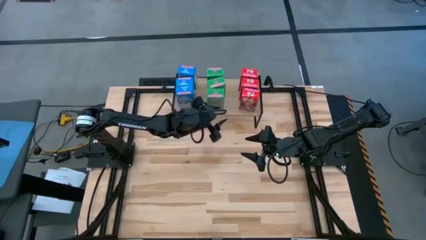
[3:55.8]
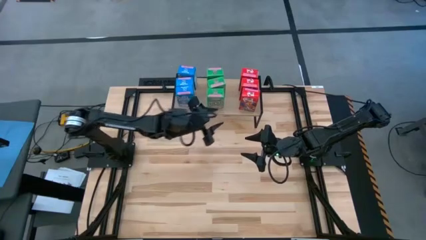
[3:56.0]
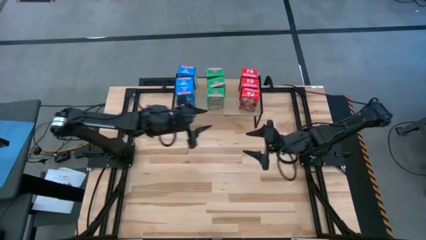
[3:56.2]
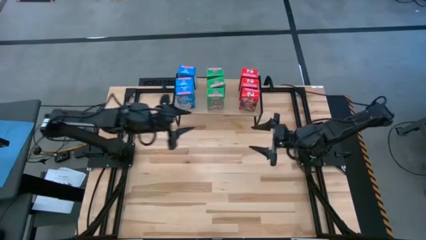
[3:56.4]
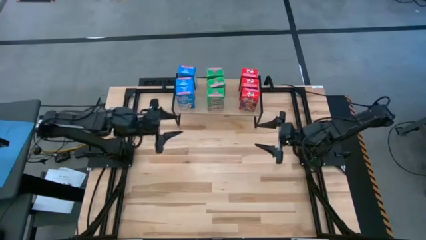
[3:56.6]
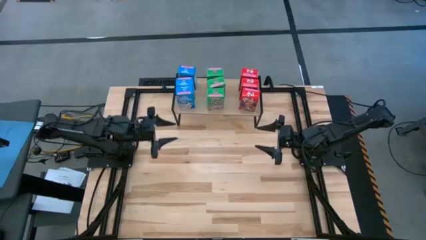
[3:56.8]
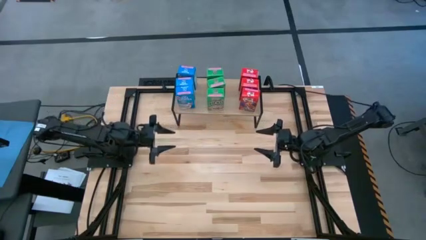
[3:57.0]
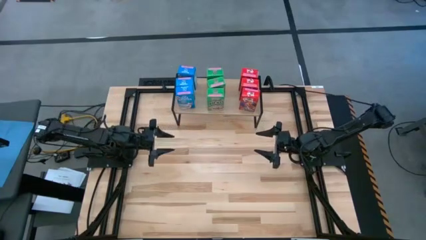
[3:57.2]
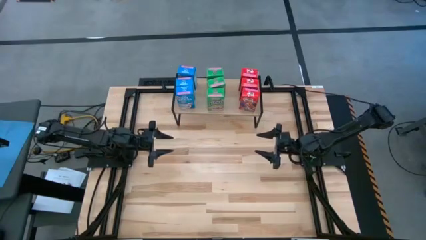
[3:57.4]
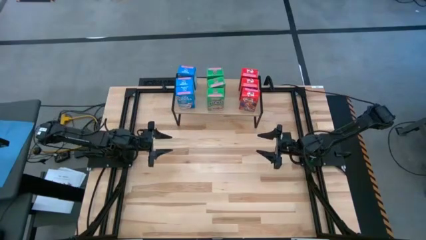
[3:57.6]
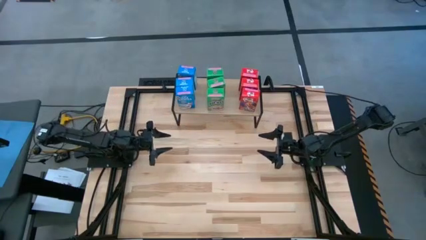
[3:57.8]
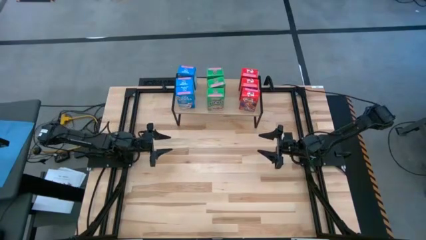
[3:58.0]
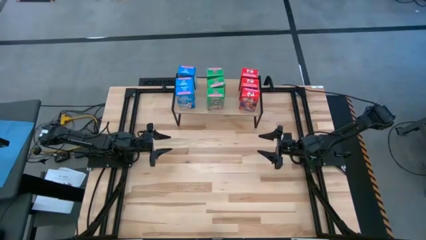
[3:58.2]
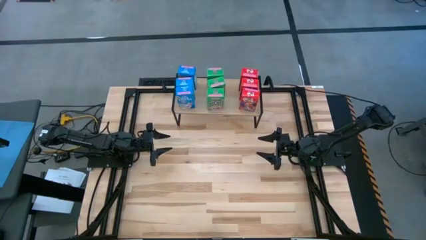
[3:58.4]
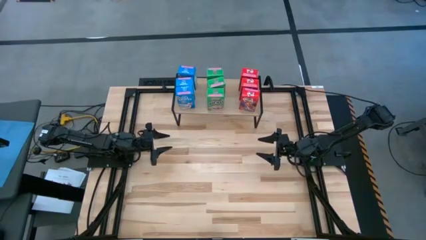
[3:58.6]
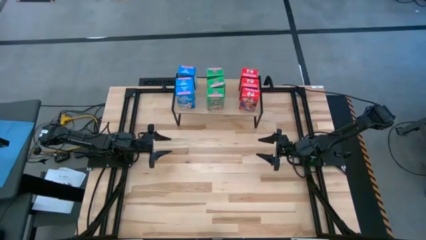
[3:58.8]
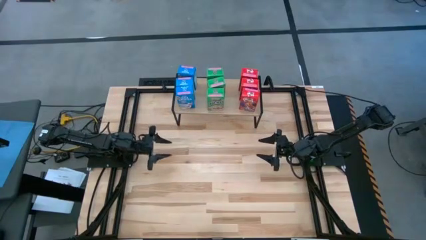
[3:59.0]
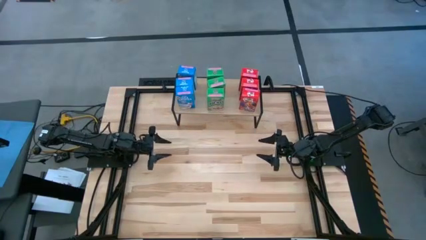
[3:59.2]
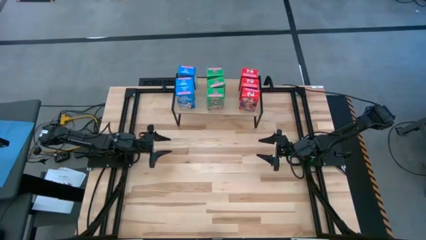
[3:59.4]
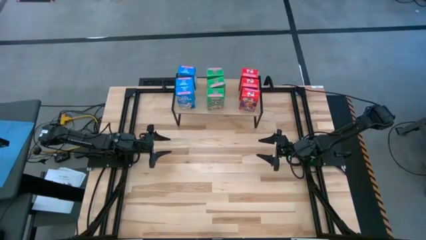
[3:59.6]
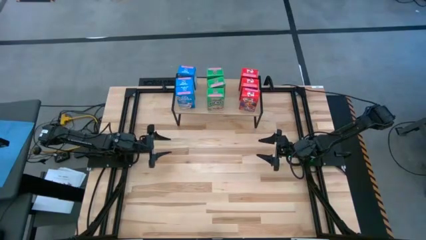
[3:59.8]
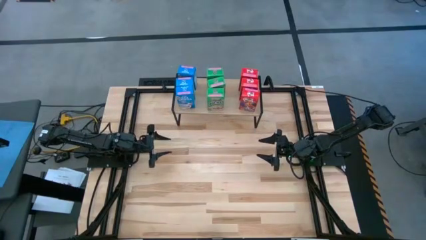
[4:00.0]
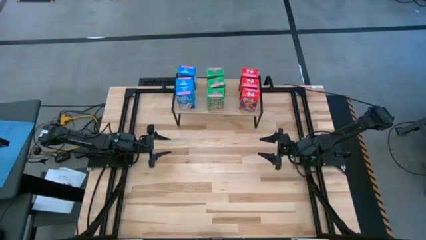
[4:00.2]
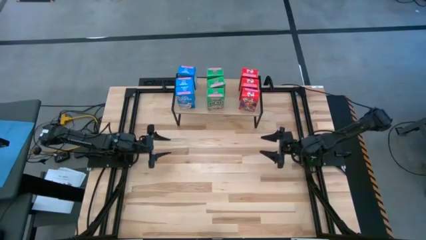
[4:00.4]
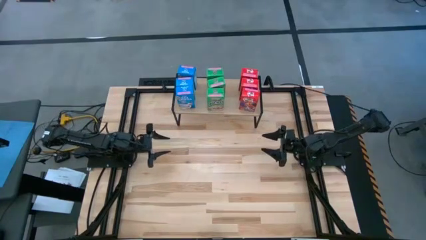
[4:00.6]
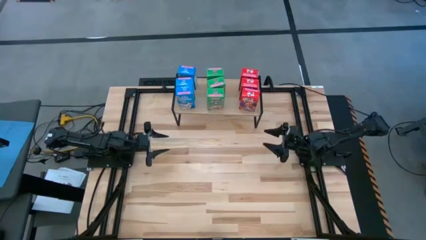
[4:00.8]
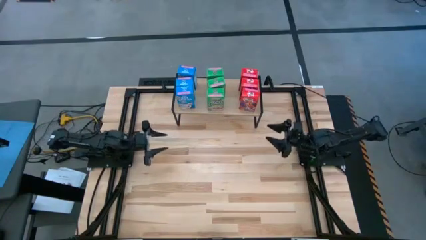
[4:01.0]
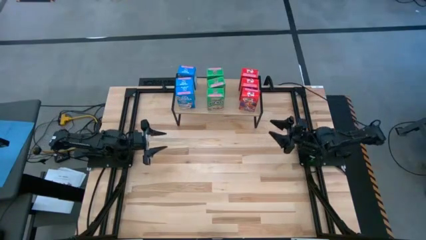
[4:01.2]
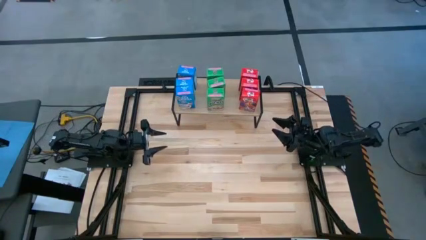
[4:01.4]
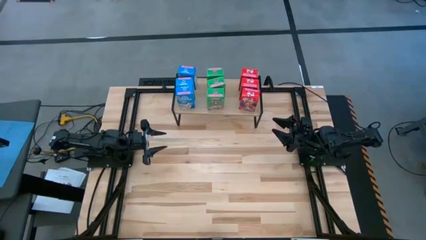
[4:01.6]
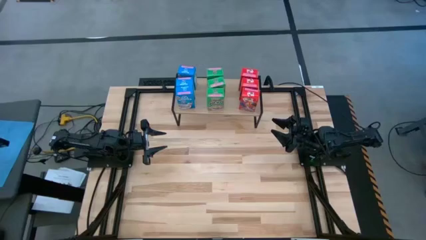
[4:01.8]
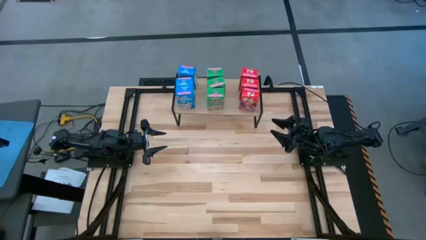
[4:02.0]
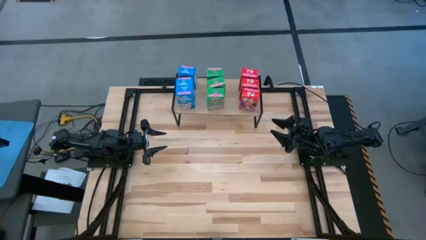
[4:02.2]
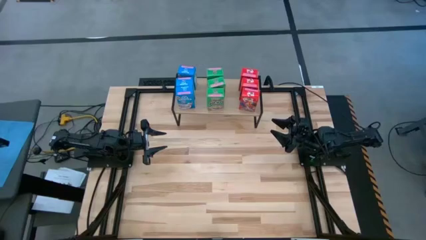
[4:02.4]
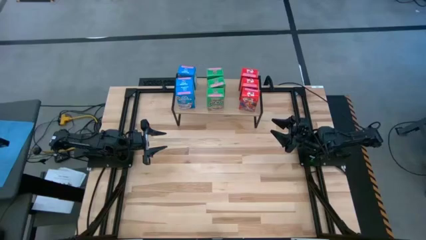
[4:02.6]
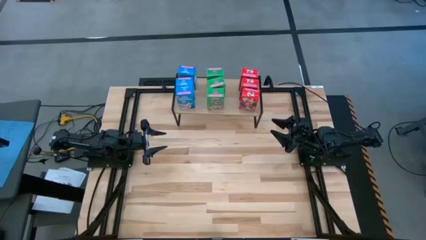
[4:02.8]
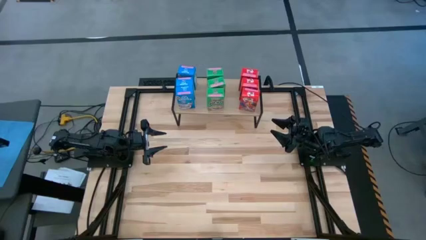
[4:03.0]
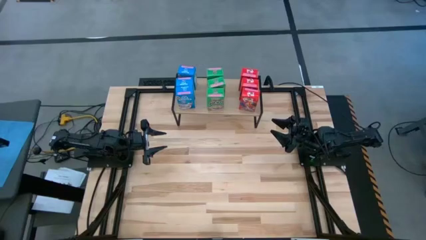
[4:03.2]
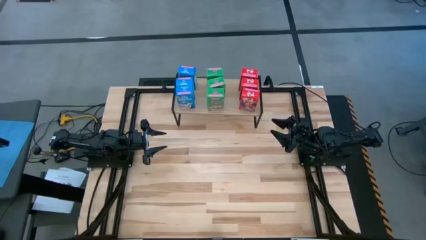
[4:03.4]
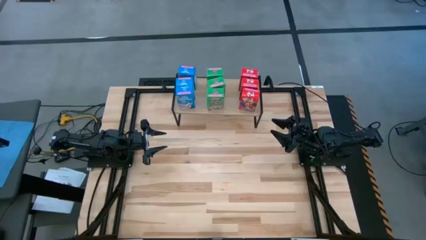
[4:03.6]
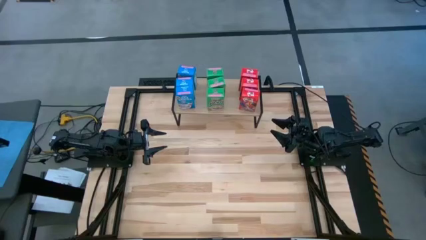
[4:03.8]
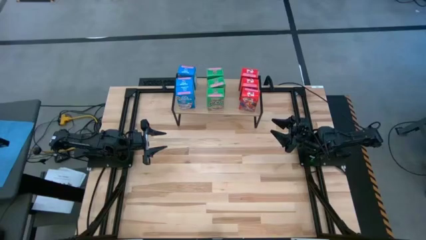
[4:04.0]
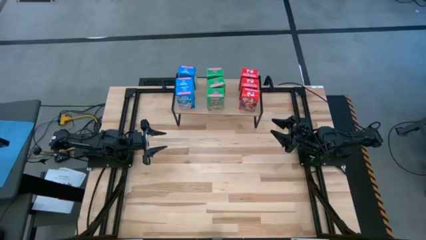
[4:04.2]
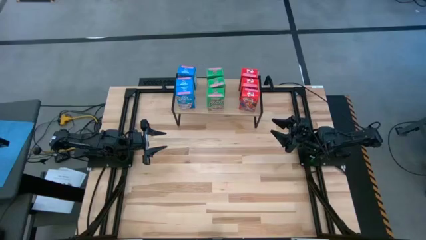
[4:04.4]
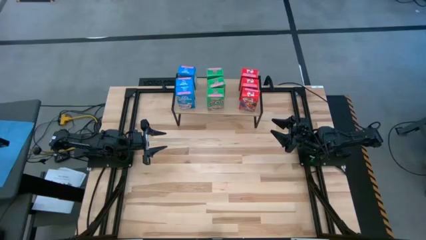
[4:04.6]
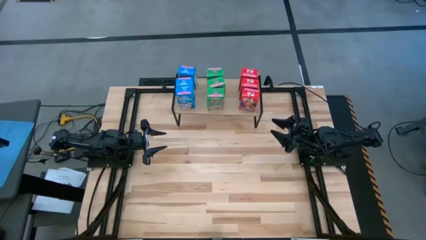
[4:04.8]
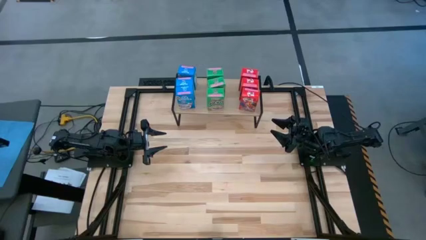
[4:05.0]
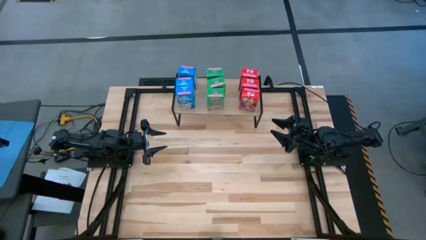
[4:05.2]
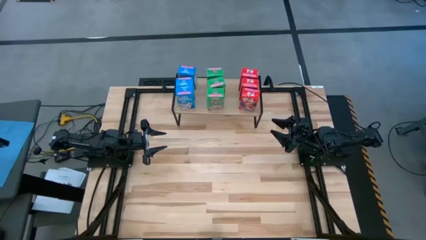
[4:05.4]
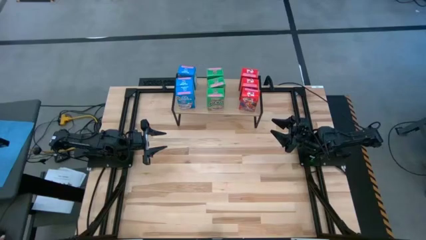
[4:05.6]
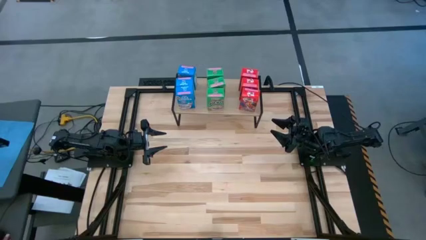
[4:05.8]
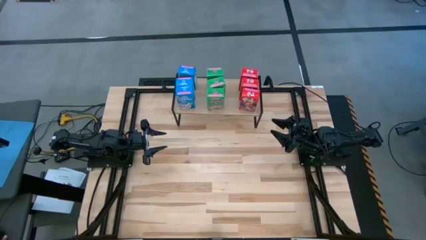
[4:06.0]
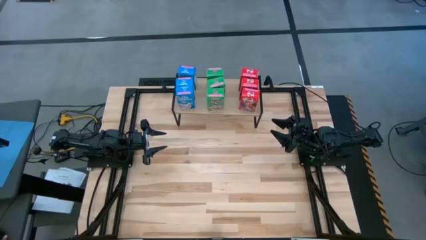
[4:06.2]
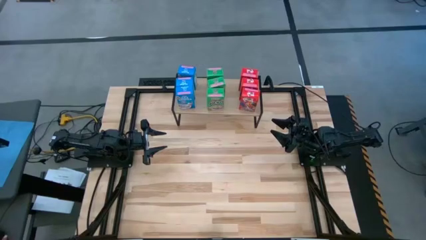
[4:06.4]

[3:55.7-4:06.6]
Task: Stack cereal on shelf
Return to Home Position

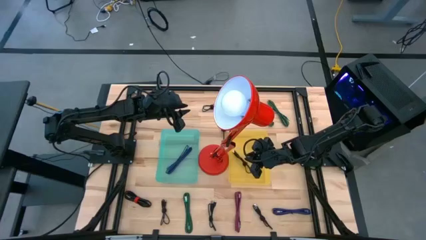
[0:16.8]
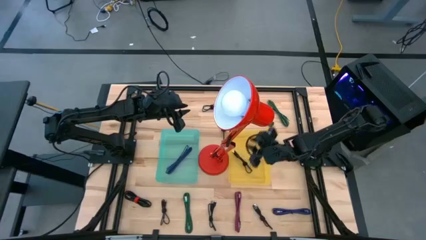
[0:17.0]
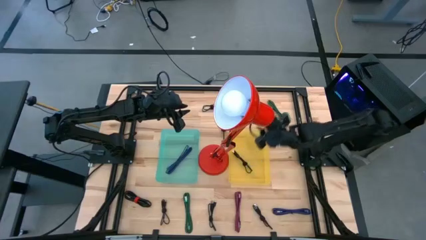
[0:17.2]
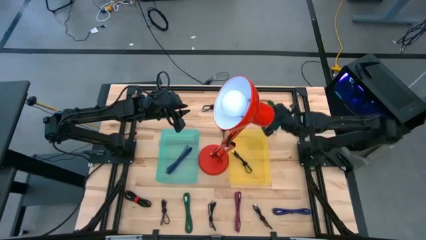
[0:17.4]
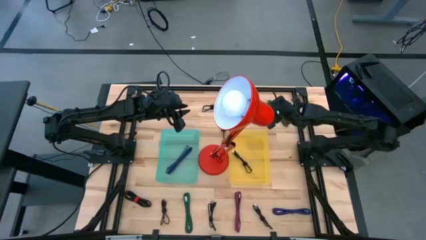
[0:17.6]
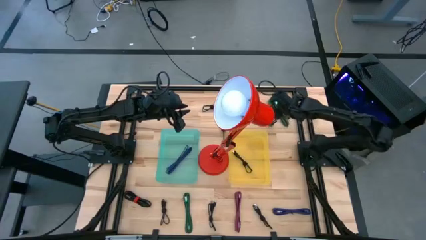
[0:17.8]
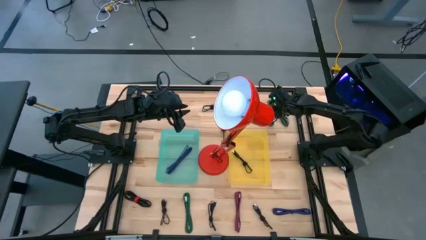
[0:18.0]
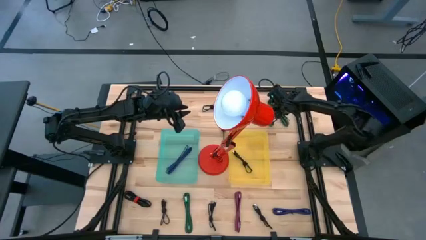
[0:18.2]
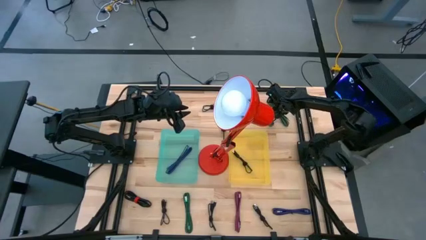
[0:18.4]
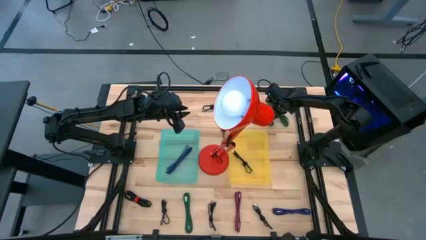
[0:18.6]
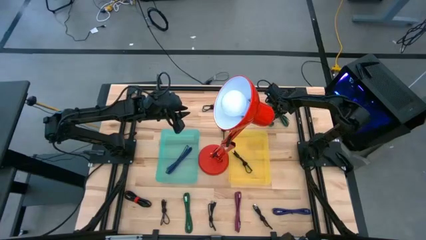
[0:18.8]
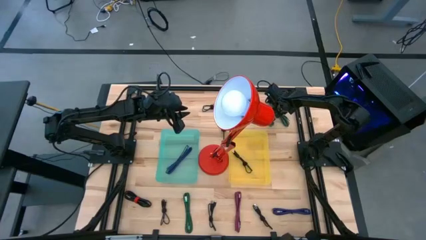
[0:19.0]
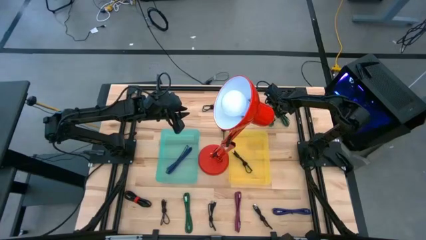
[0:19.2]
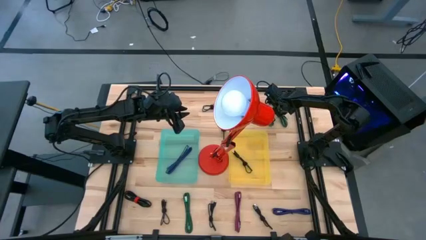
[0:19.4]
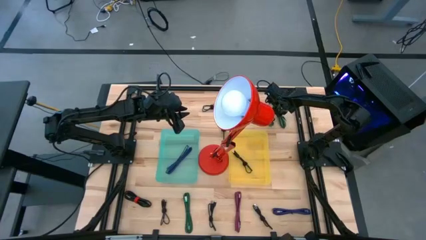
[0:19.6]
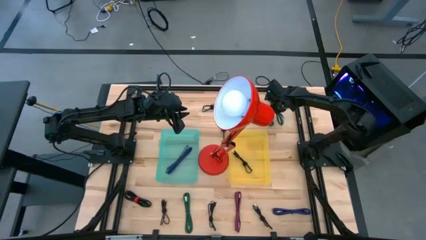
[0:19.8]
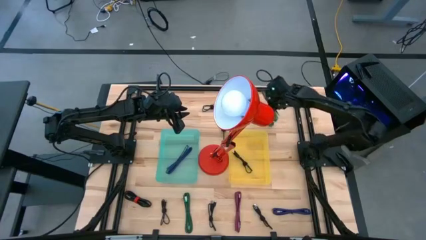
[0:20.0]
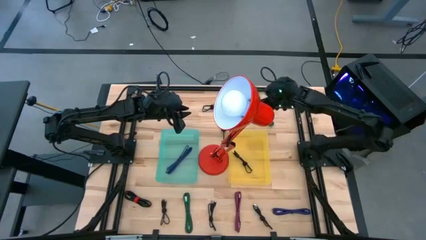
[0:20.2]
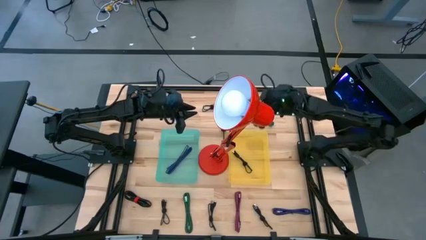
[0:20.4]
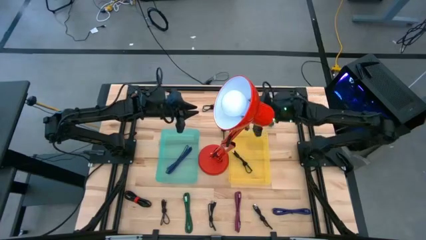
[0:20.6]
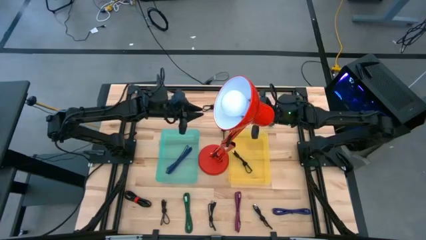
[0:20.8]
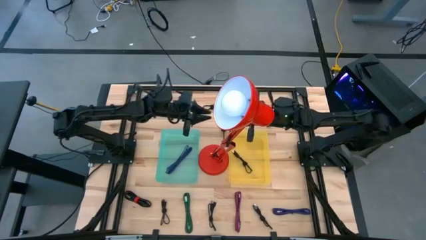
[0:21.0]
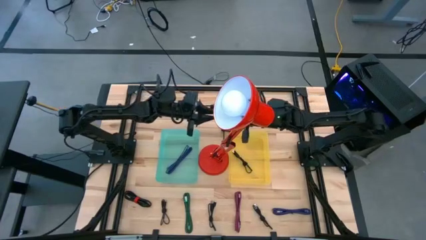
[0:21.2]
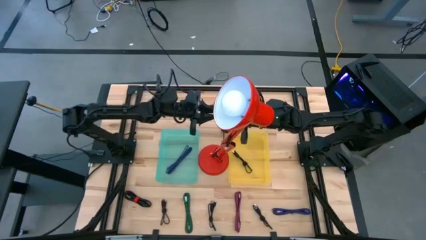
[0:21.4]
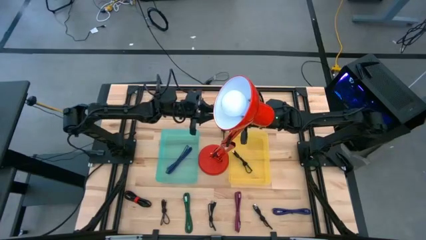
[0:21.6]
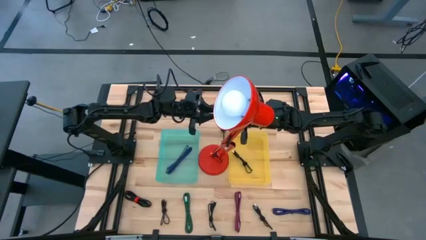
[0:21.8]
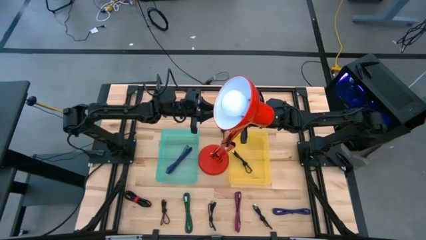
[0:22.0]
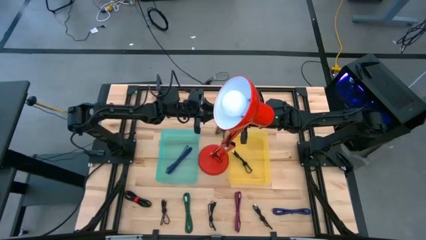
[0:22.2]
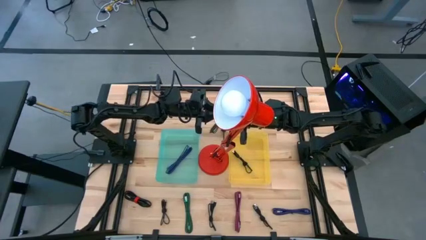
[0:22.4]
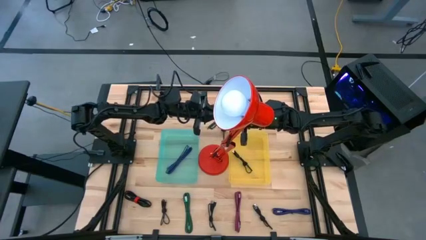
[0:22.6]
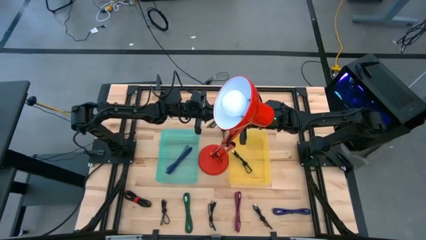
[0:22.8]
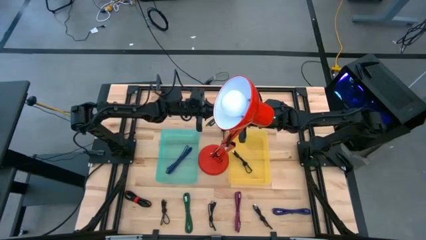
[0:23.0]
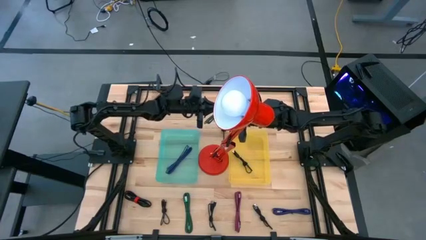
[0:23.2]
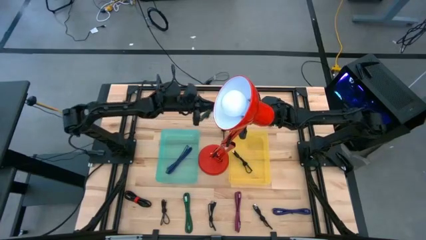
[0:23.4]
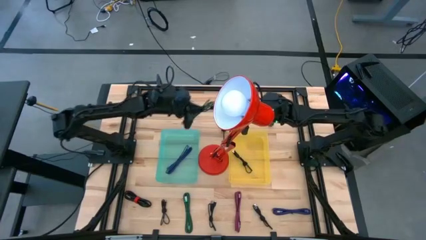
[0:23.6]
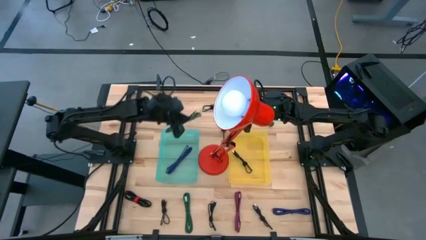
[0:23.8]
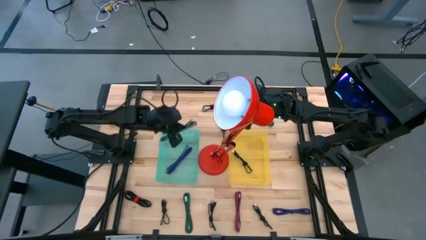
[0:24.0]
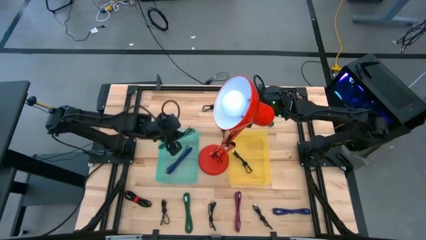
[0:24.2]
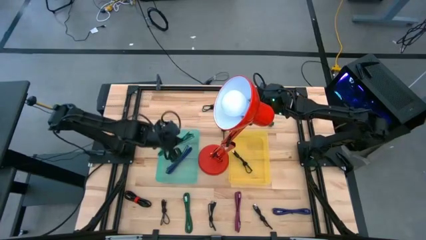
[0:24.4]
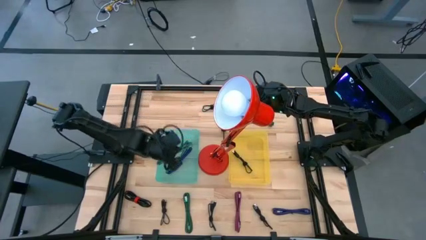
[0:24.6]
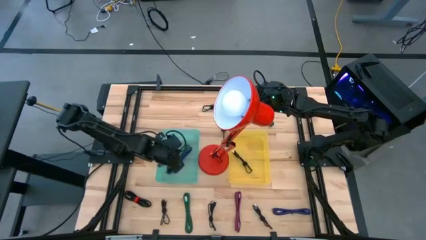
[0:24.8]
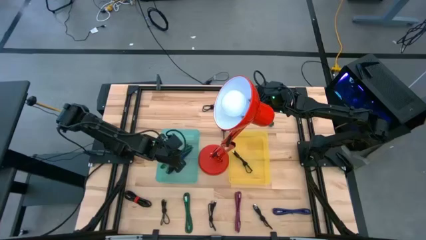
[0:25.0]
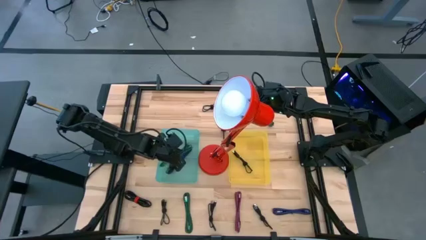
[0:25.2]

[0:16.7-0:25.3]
Task: Pick & Place USB Port
Put the right green patterned charger cable into the blue bin
